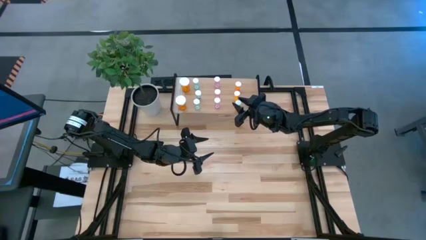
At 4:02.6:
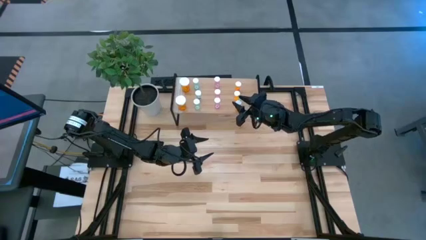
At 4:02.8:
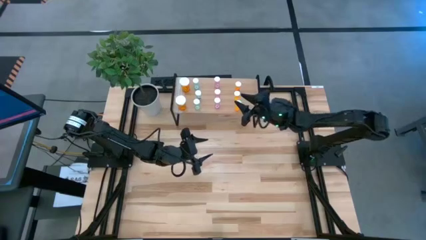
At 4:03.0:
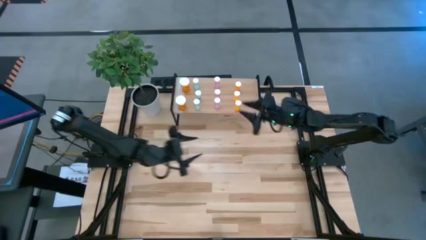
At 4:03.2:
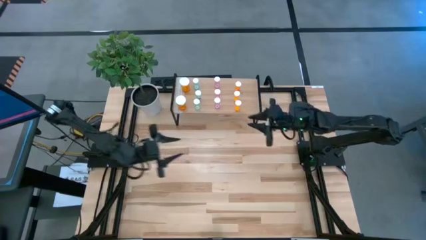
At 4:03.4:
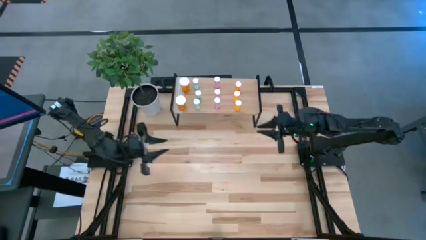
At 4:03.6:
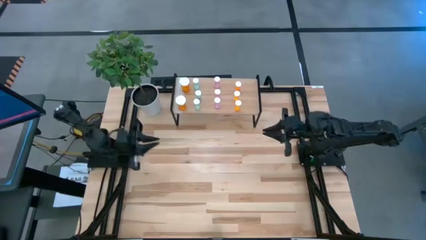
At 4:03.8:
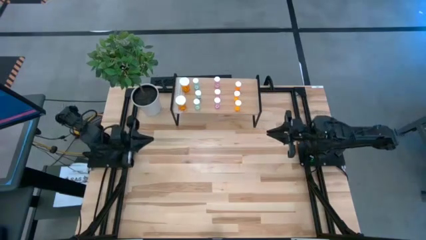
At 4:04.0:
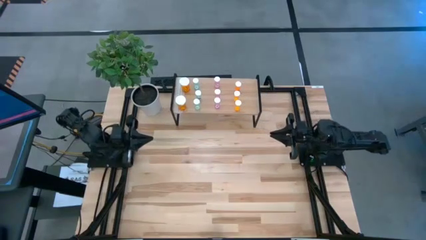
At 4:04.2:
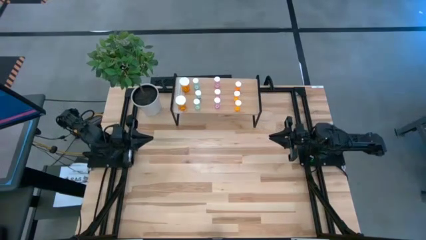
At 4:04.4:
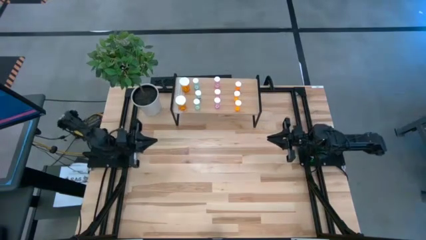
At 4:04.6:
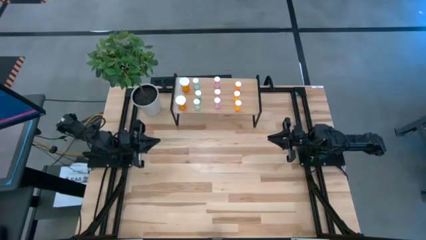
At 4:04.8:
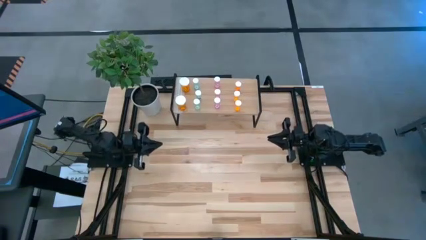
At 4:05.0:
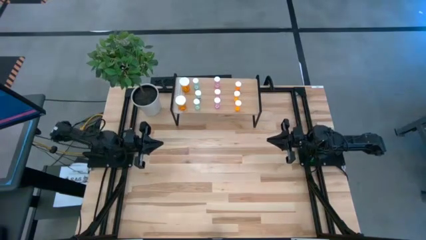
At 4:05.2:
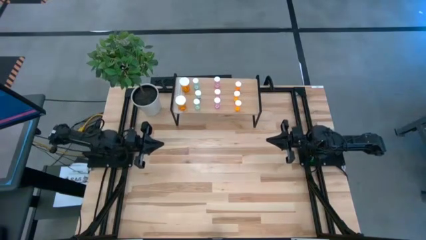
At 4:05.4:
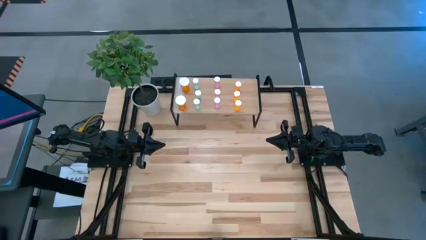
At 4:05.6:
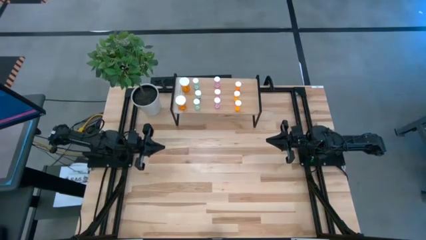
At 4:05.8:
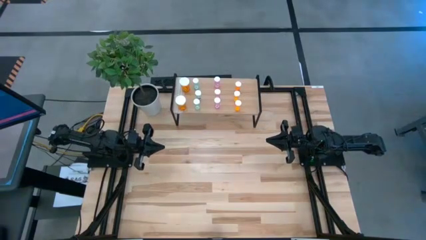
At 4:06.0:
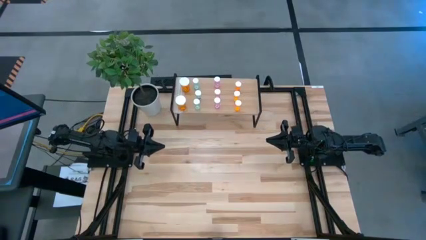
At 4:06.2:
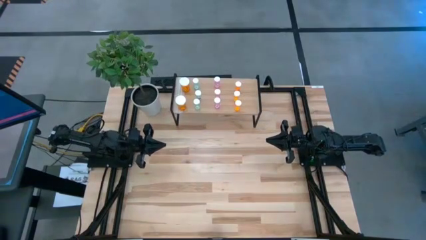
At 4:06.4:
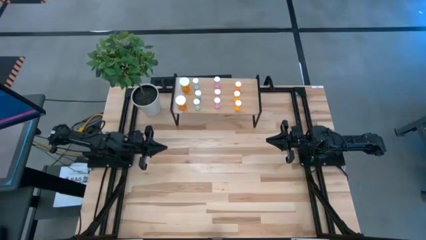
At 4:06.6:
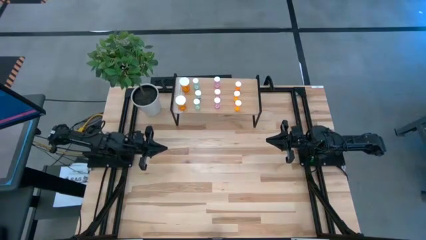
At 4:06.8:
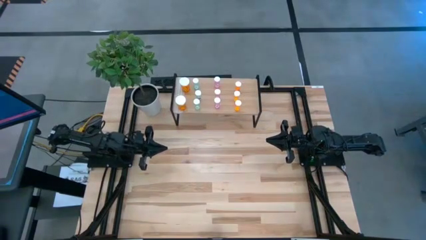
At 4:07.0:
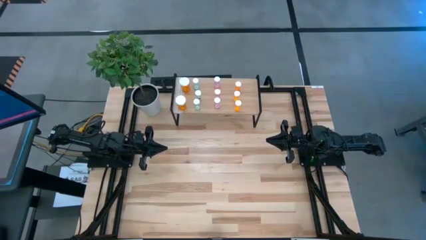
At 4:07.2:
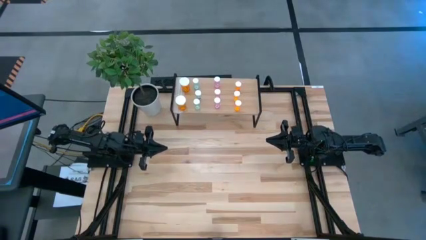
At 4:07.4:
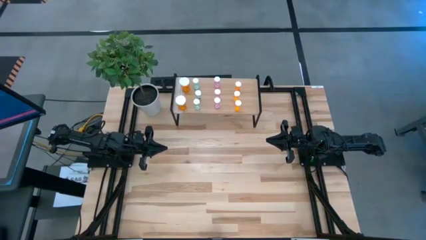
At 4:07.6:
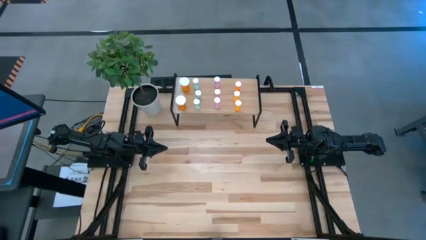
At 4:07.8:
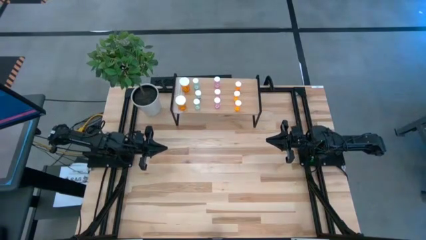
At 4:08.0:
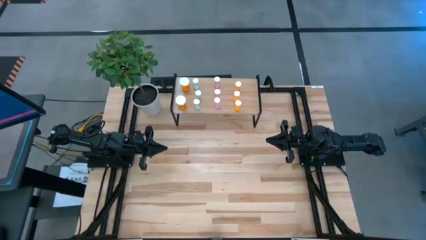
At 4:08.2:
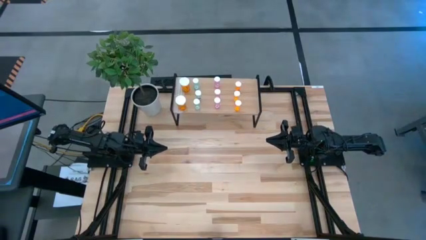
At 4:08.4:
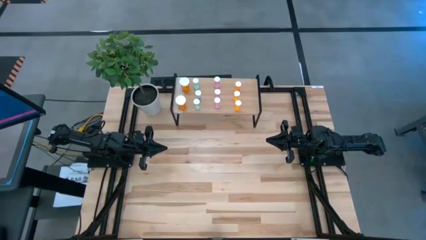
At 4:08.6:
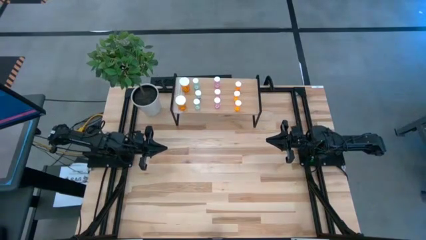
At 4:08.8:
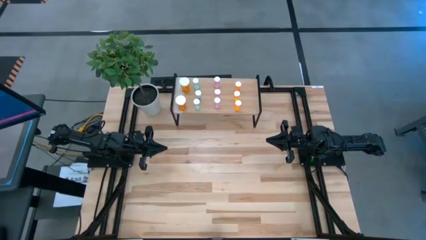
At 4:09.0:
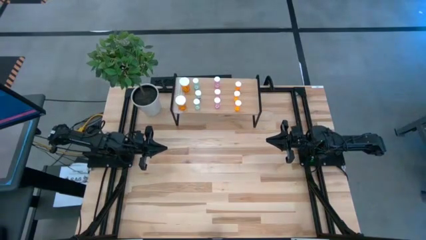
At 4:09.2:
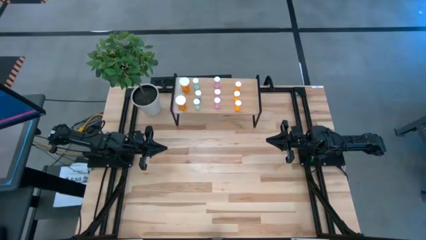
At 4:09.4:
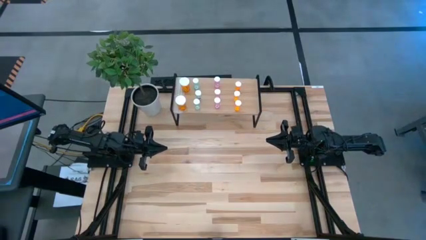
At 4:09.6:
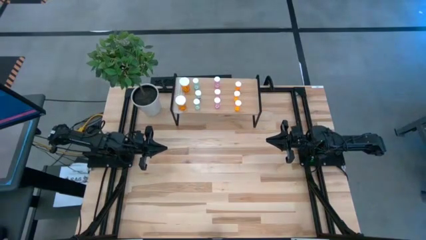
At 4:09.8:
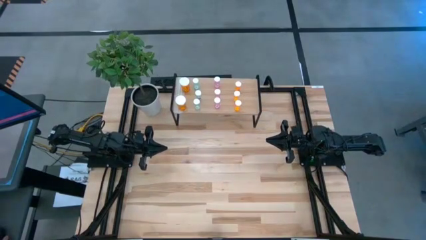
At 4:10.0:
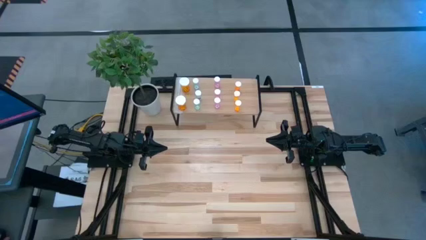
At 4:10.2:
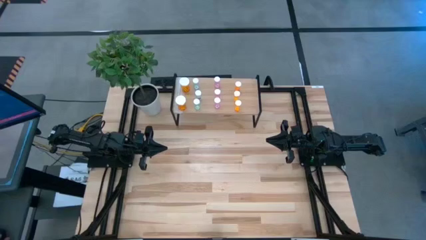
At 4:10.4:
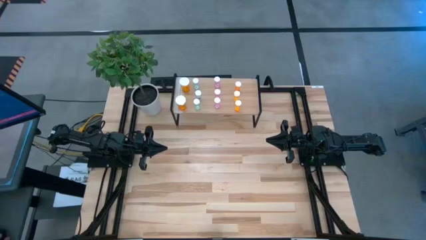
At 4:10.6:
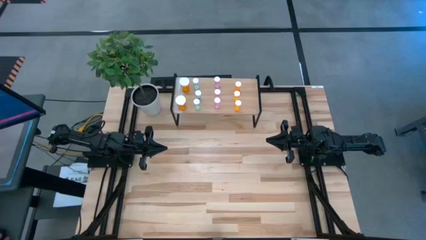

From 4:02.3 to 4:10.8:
Task: Pick and place medicine bottles onto shelf by color
Return to Home Position

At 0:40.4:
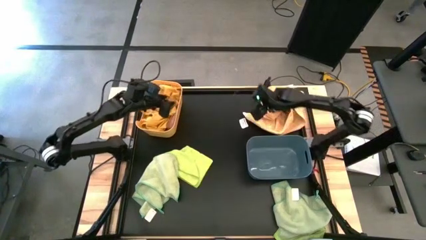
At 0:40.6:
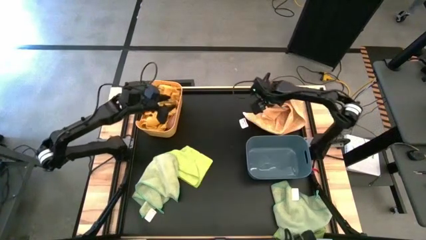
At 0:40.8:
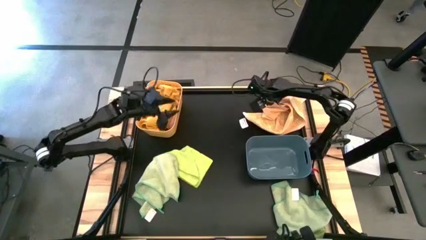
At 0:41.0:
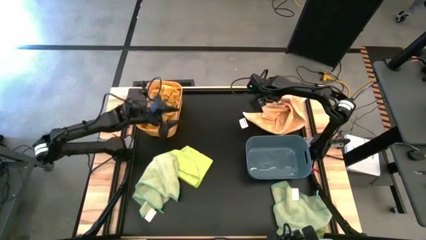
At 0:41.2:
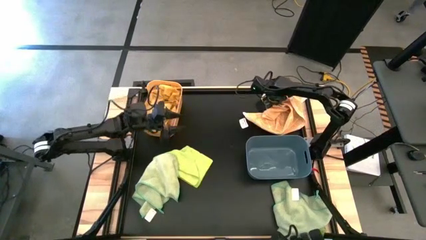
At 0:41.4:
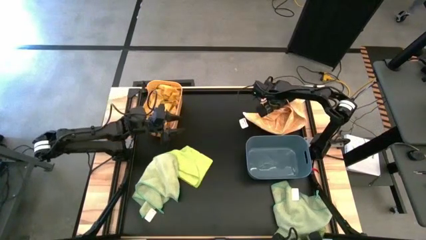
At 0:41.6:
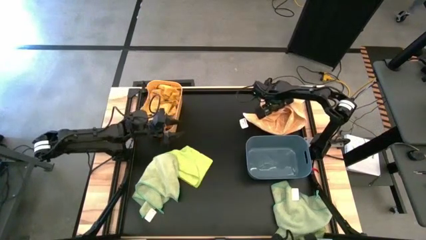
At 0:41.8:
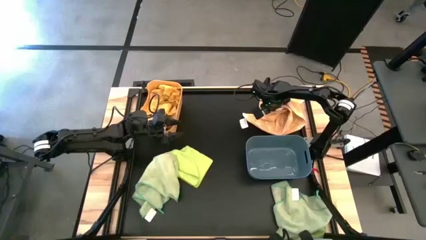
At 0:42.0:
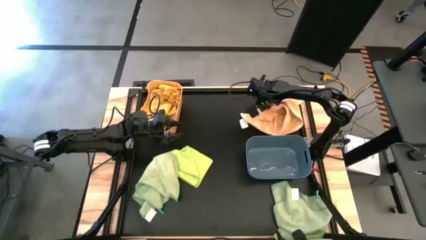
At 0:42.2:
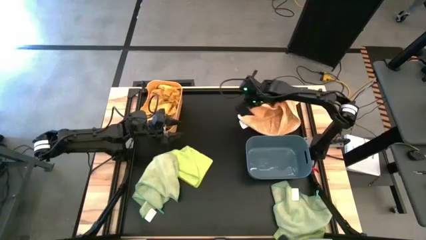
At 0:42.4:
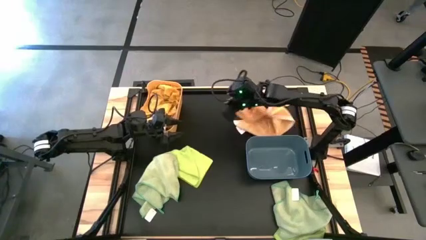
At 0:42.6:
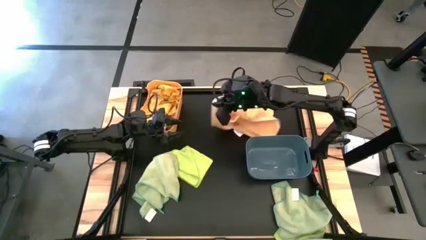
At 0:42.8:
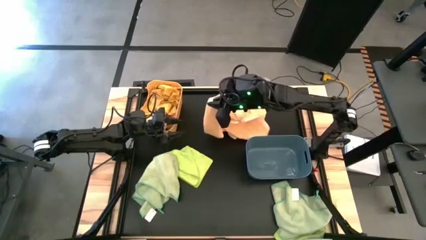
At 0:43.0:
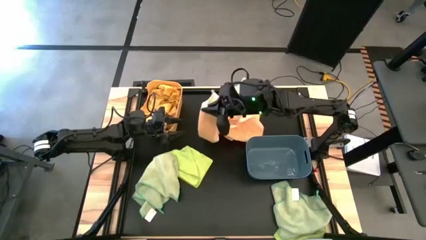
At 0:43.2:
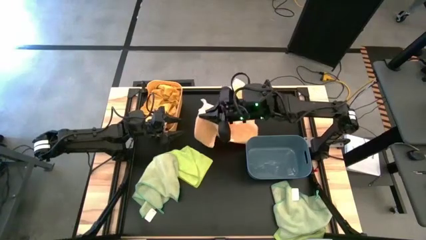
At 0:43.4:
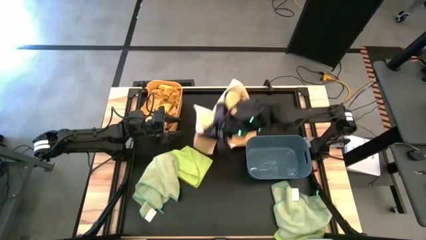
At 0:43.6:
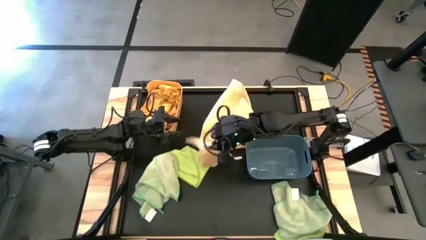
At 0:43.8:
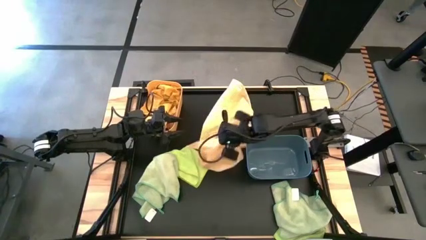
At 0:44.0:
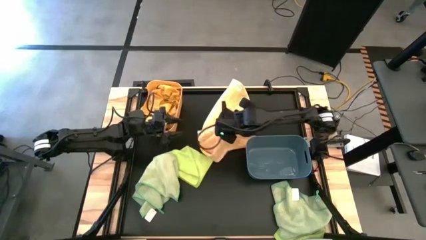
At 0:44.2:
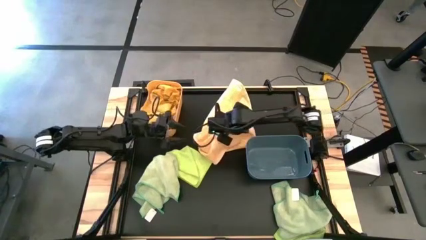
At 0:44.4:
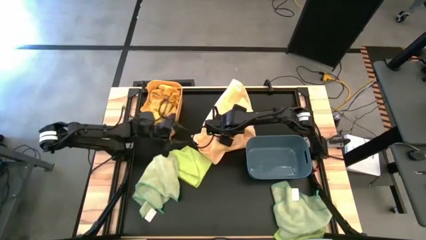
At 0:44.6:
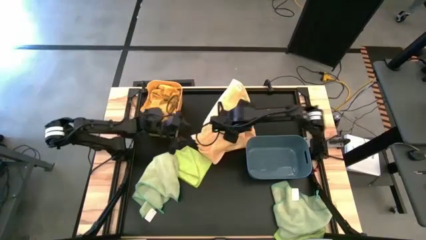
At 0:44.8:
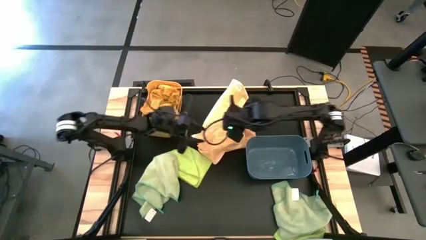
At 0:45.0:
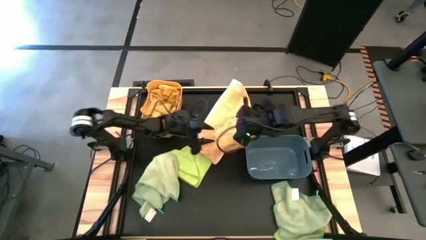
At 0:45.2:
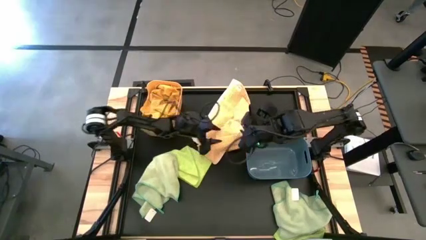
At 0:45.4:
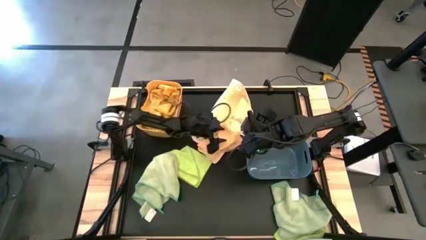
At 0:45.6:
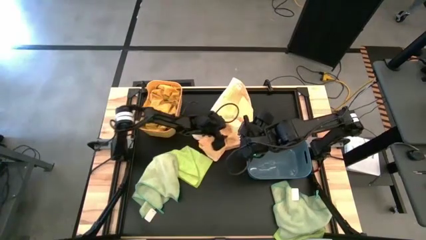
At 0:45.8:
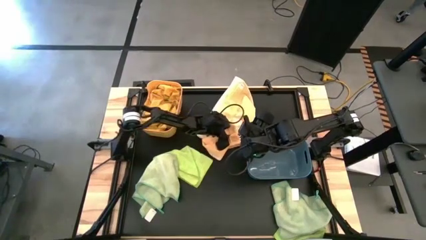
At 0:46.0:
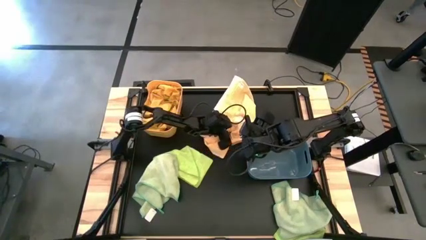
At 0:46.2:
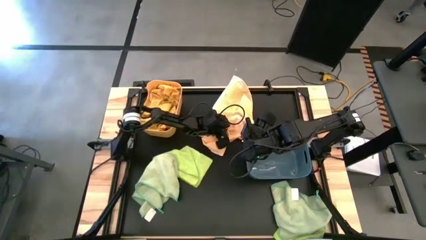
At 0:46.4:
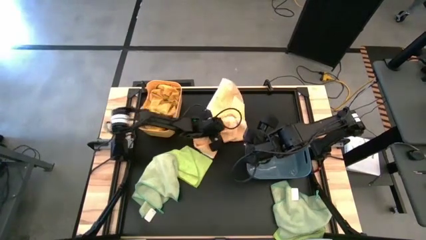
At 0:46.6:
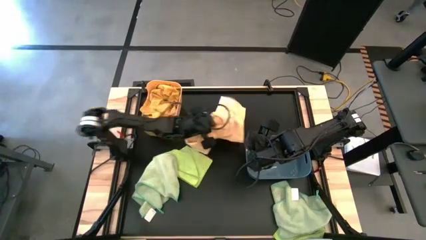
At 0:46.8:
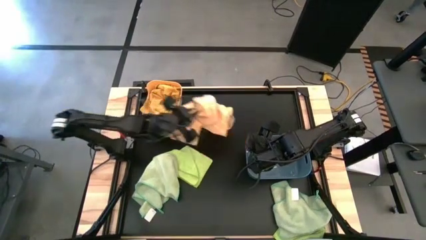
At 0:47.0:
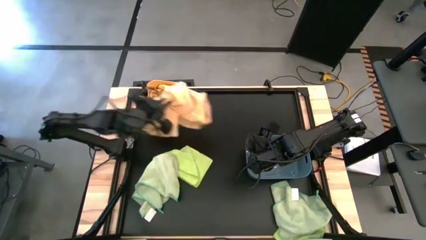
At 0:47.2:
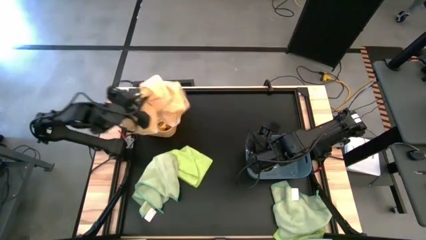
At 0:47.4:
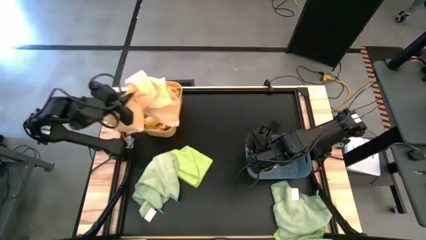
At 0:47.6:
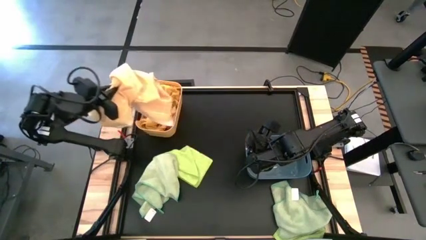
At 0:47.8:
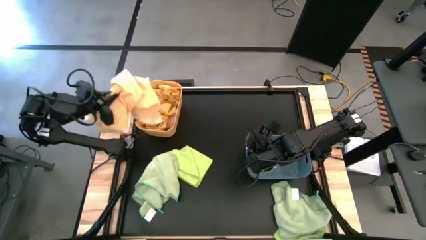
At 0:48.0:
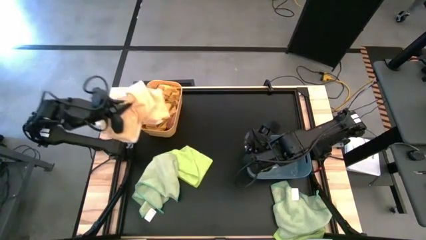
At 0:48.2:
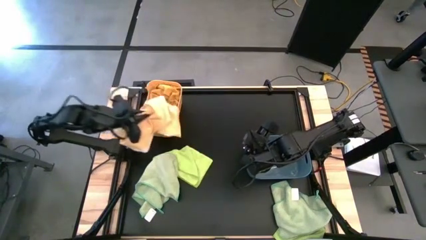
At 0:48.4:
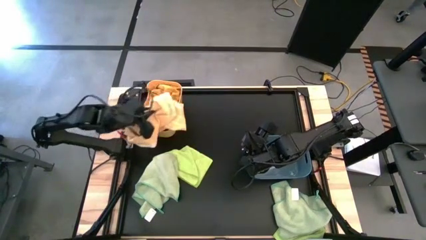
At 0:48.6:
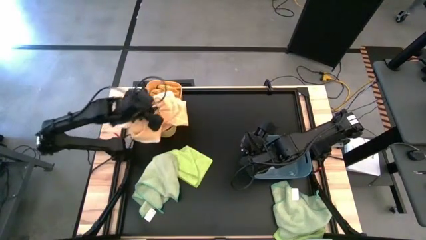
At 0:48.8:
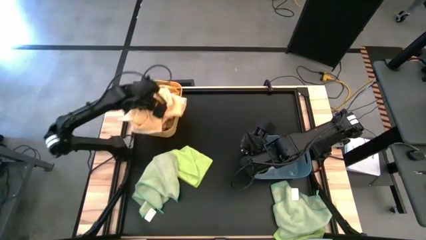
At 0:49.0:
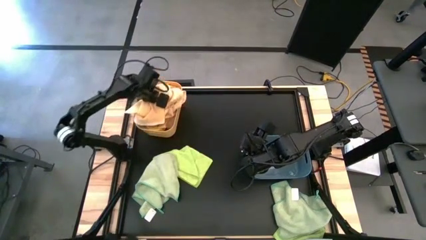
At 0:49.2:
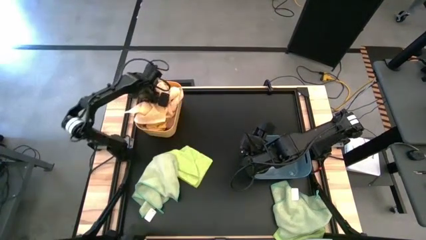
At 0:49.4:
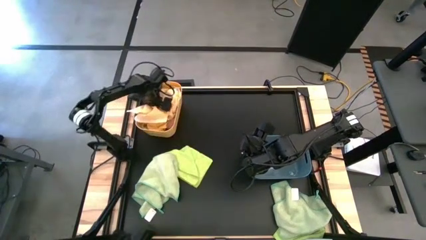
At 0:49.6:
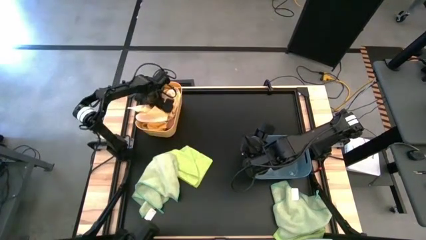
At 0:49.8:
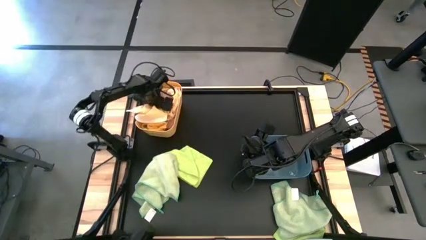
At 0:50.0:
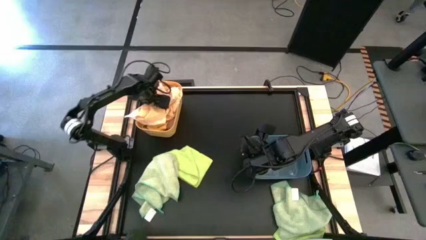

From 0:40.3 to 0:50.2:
Task: Sort towels by color in basket
Put the light yellow microfiber cloth into the yellow bin
